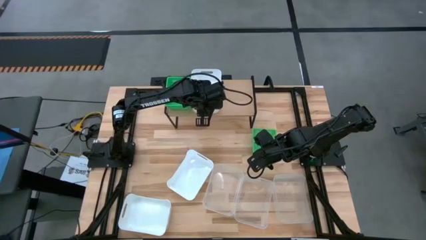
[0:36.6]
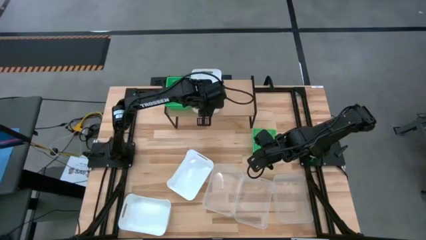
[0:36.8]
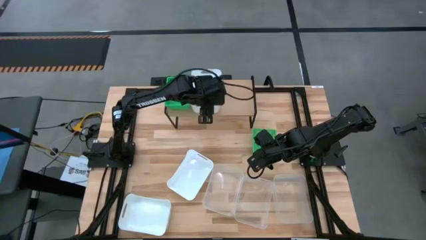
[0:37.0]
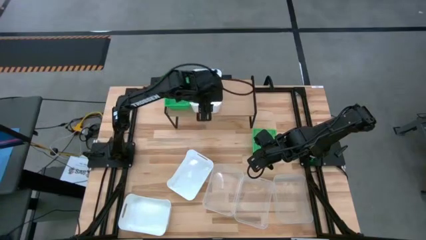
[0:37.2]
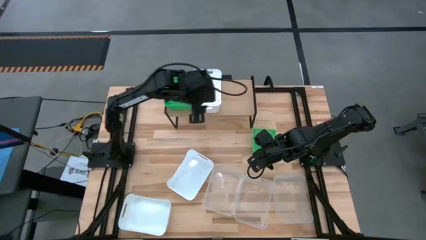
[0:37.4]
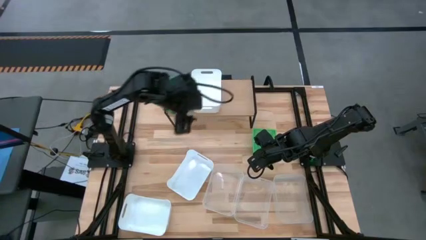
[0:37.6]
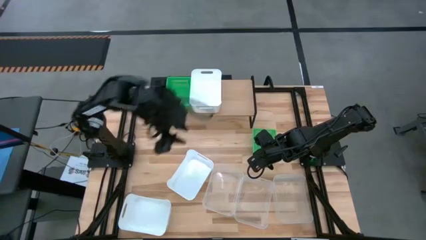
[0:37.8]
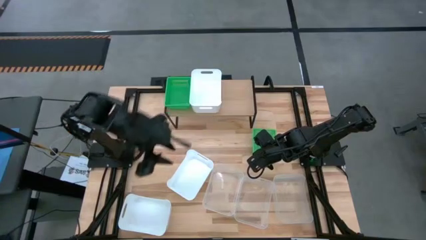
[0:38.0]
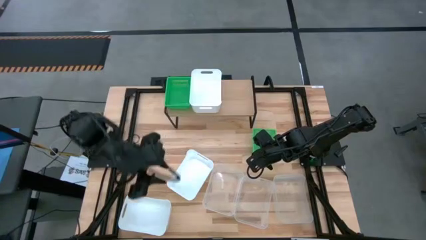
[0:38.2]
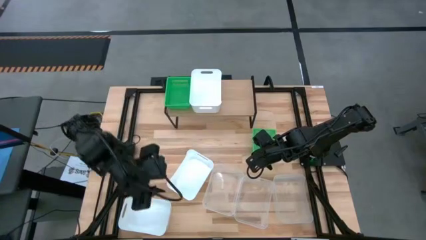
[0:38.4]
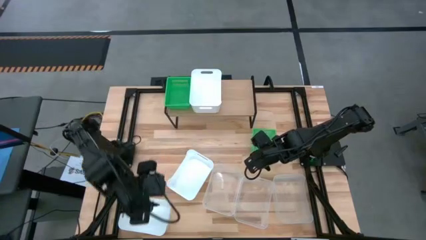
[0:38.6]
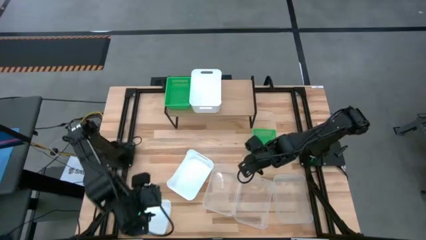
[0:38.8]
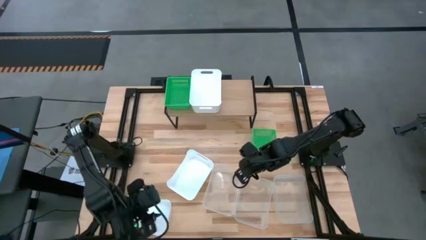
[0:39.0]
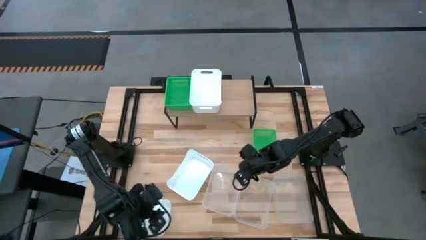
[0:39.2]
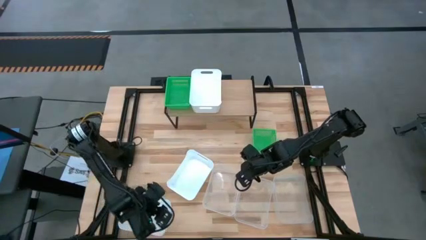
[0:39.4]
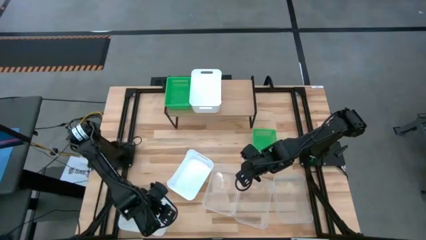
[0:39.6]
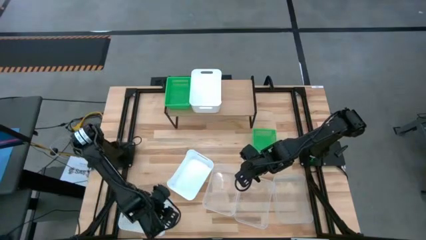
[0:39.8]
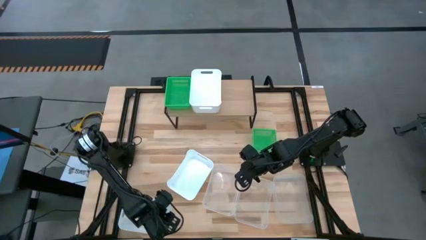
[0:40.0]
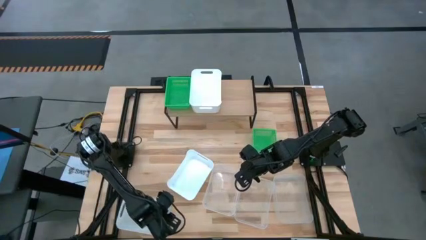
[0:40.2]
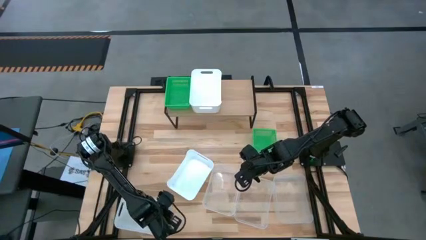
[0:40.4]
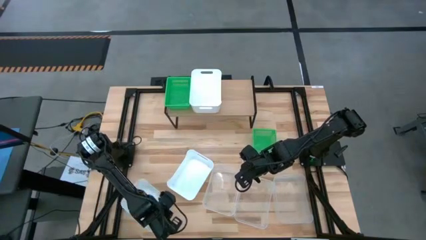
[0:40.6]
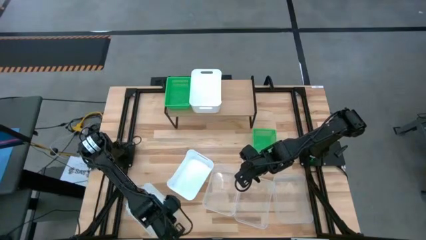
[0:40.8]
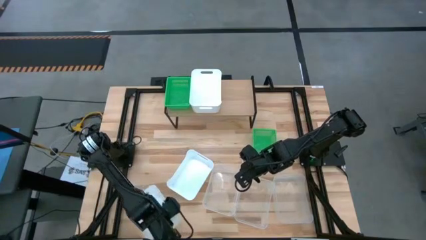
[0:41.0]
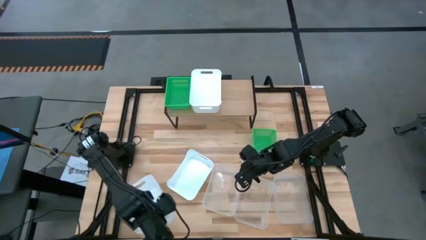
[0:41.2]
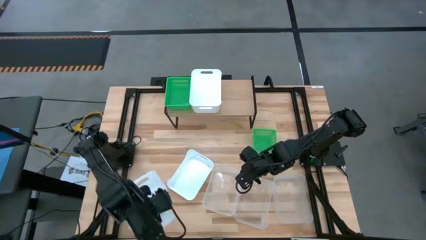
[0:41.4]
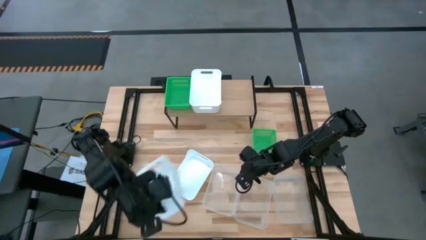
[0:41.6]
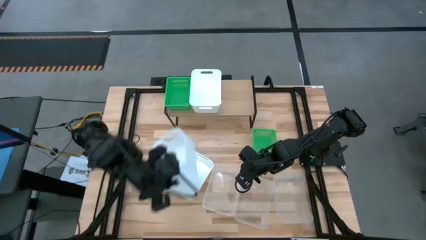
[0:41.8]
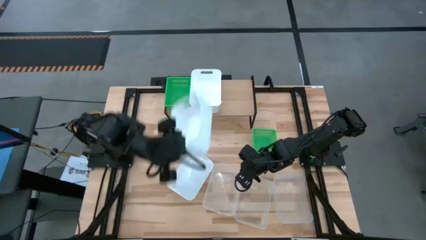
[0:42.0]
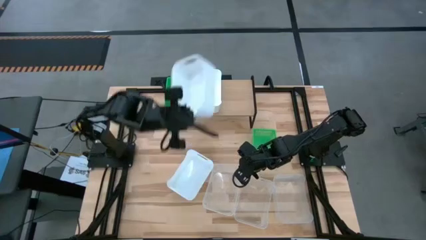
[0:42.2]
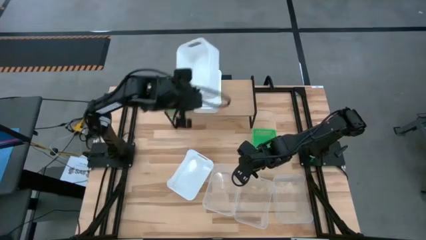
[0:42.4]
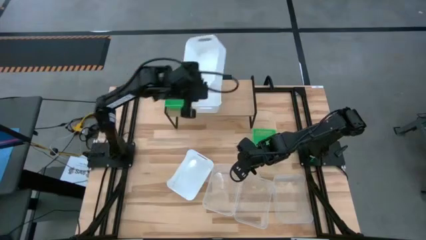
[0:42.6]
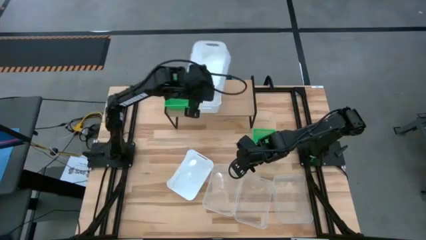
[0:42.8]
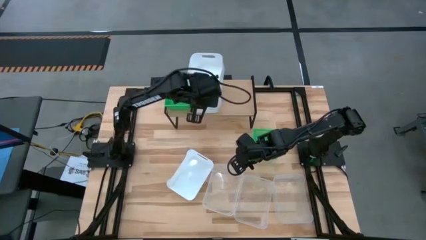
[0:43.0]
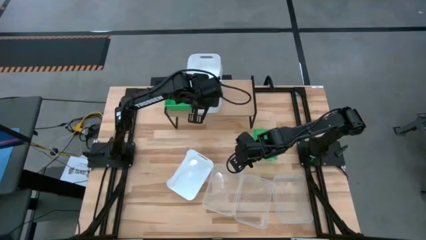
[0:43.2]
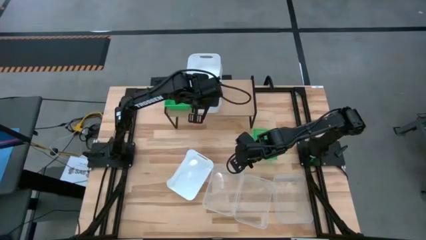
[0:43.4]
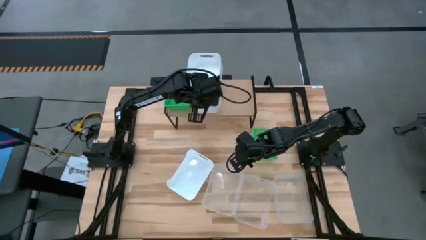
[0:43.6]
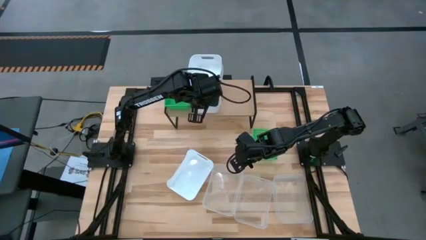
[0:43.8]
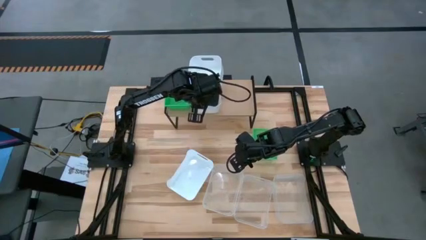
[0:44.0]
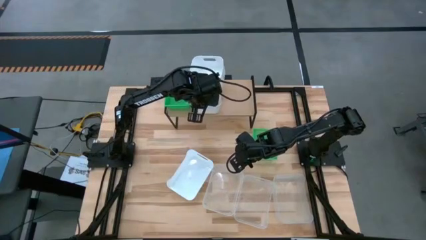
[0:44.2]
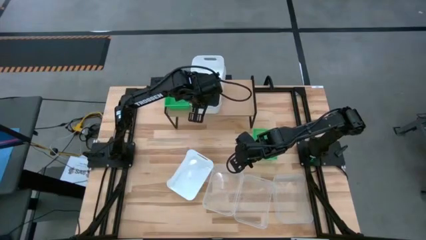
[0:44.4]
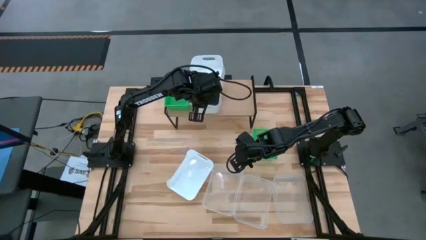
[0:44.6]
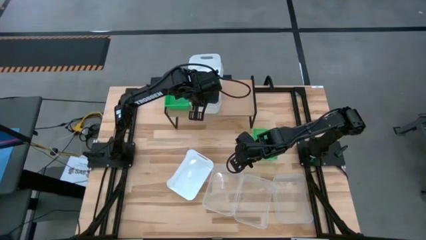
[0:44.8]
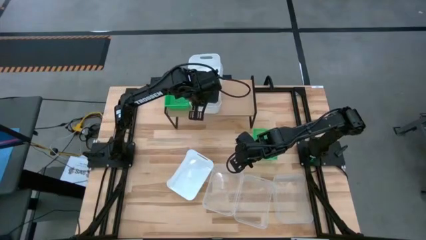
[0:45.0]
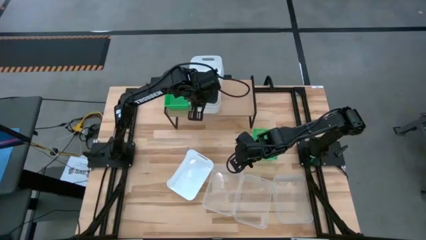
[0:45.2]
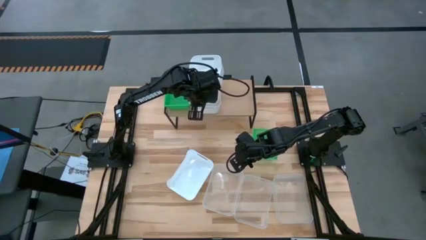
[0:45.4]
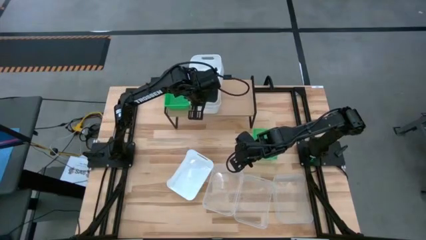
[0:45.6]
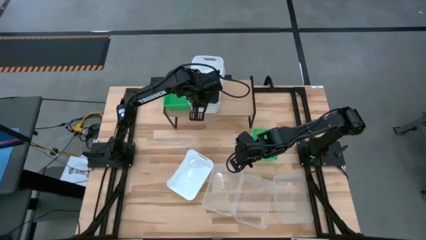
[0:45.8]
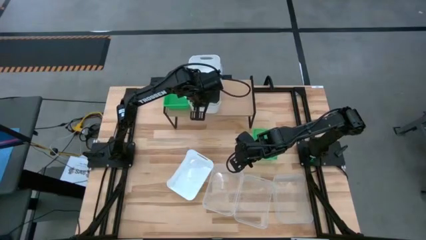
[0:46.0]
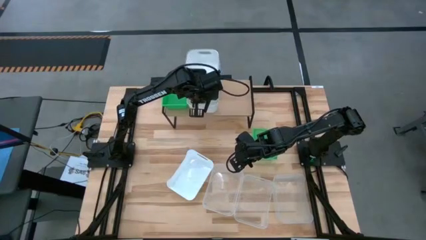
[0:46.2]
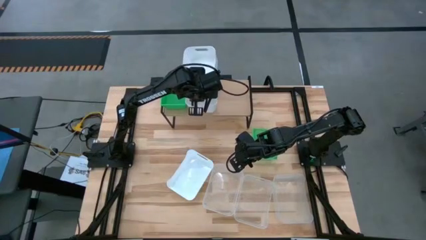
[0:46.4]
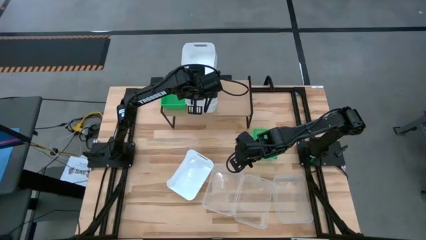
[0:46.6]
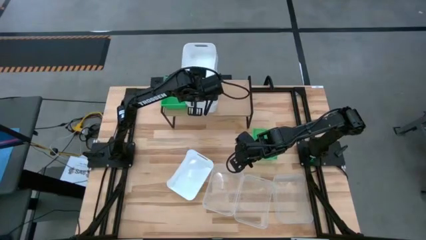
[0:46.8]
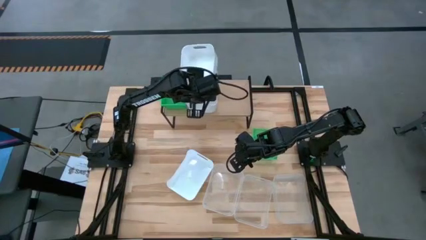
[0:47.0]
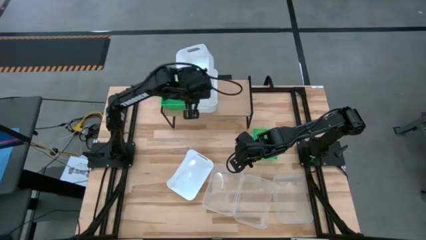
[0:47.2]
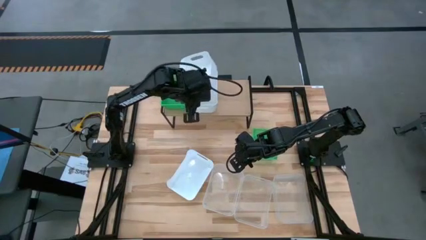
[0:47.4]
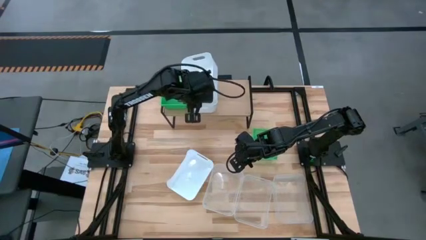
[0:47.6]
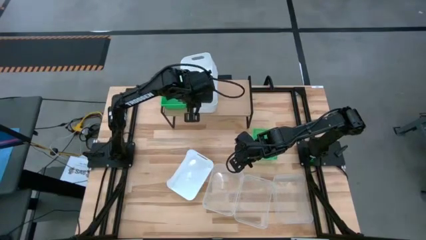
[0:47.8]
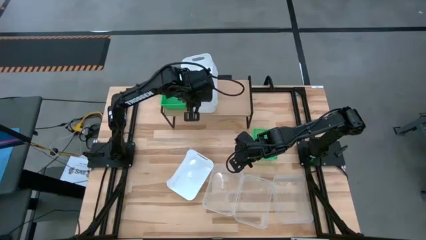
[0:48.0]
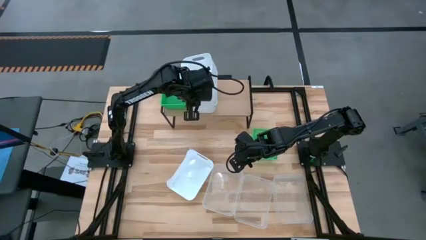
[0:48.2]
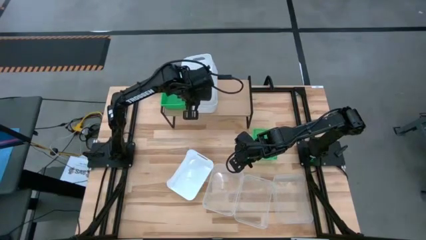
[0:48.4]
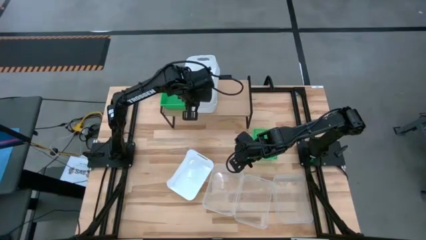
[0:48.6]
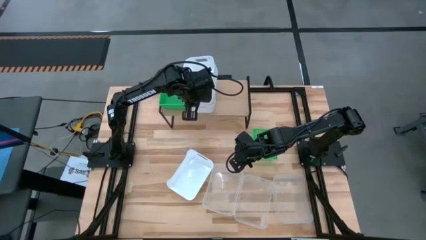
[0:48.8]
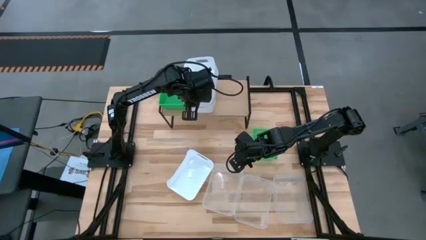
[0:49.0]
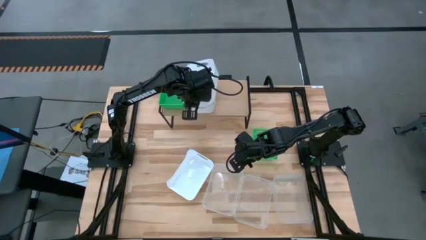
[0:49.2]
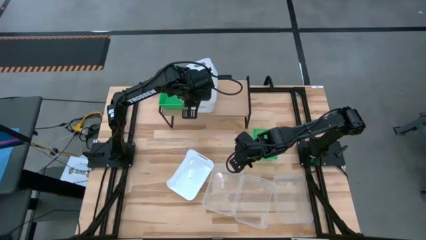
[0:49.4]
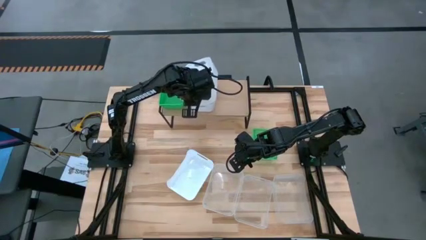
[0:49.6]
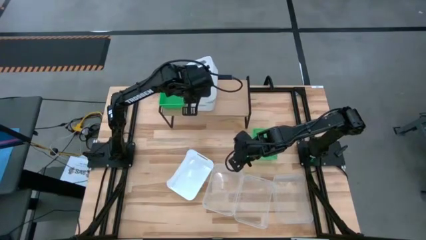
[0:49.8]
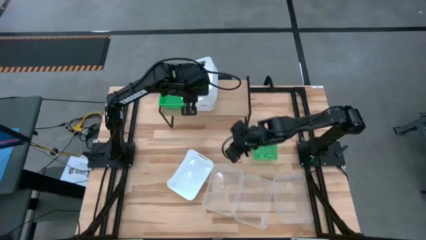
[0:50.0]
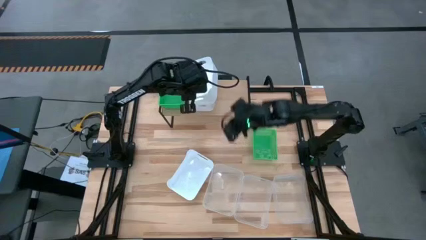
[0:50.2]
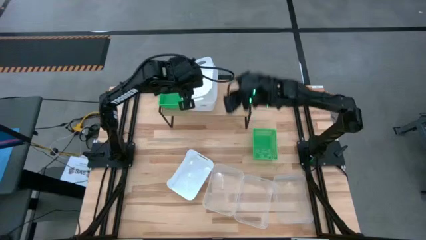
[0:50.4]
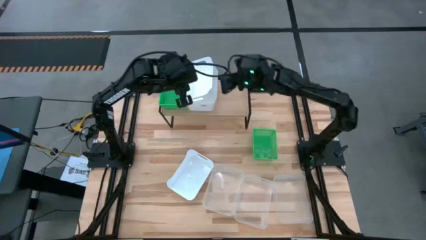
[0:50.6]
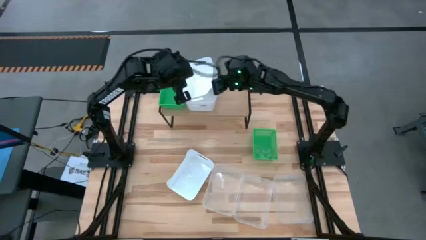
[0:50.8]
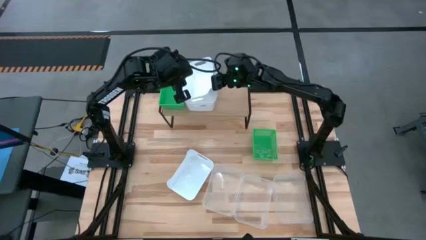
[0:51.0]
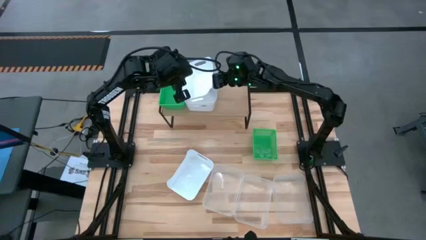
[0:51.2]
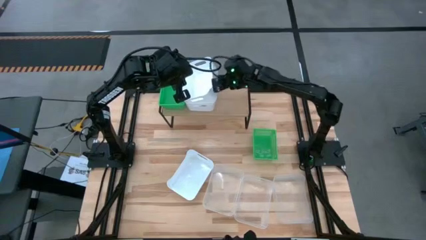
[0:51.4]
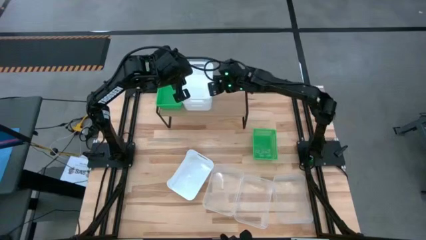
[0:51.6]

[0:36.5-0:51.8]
Task: Stack baskets on shelf by color
Stack the bottom white bin on top of the white bin on the shelf
